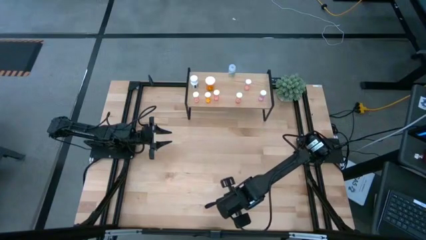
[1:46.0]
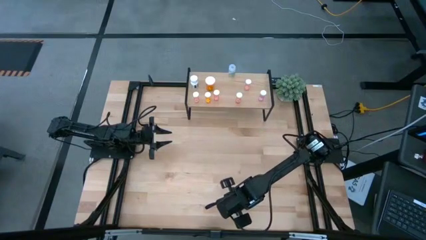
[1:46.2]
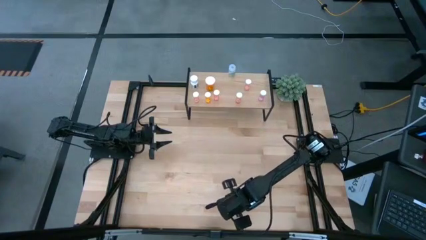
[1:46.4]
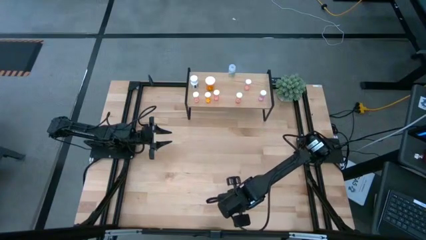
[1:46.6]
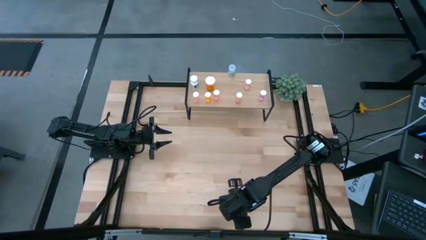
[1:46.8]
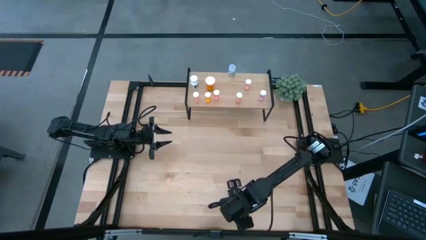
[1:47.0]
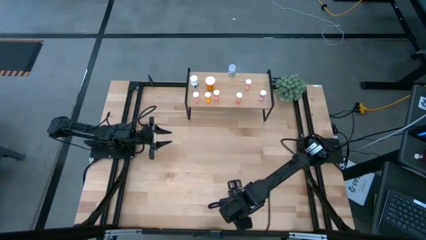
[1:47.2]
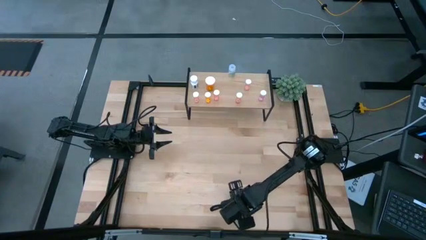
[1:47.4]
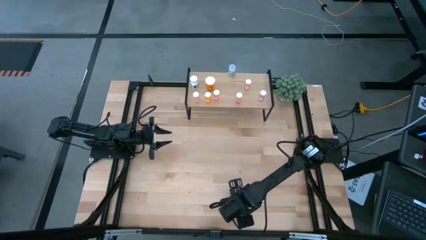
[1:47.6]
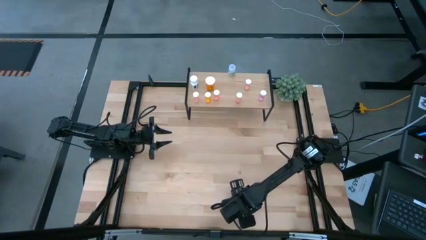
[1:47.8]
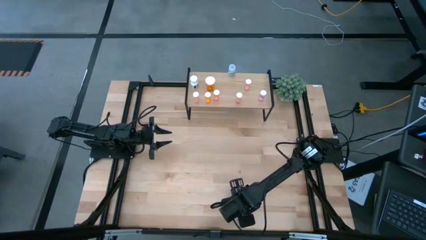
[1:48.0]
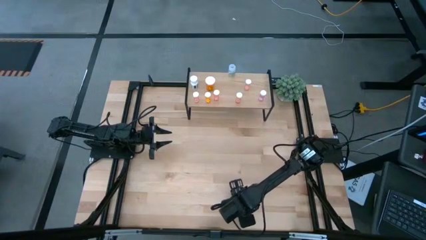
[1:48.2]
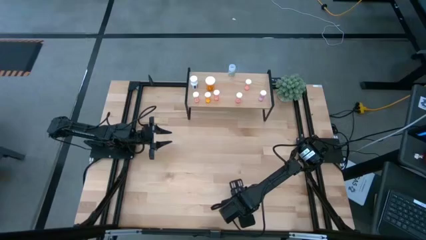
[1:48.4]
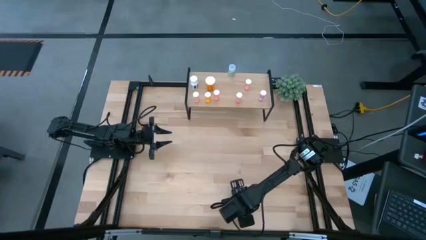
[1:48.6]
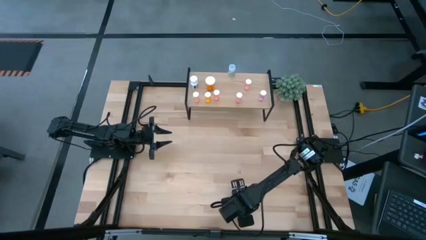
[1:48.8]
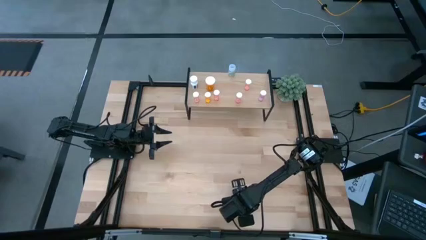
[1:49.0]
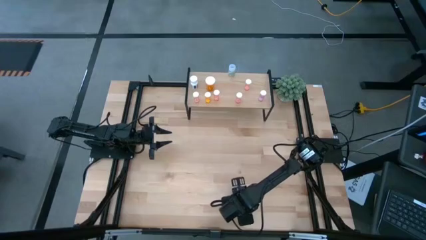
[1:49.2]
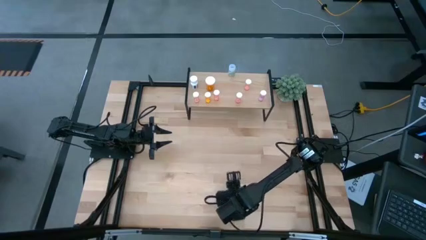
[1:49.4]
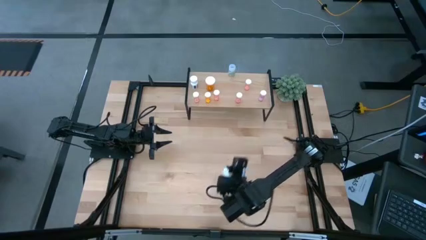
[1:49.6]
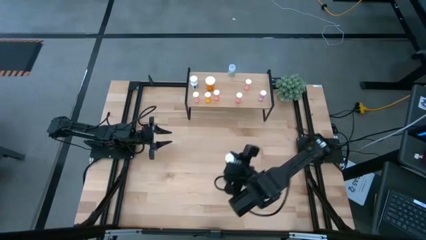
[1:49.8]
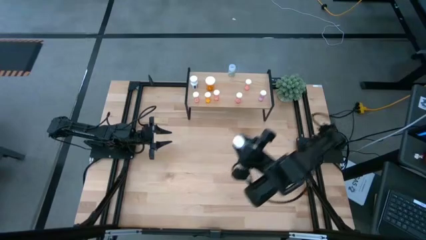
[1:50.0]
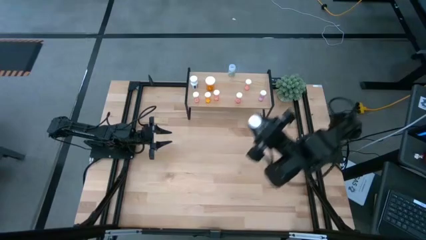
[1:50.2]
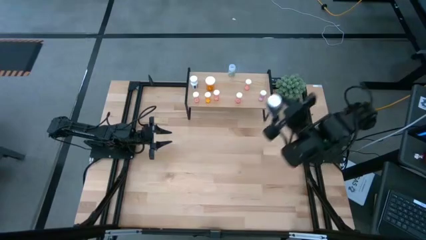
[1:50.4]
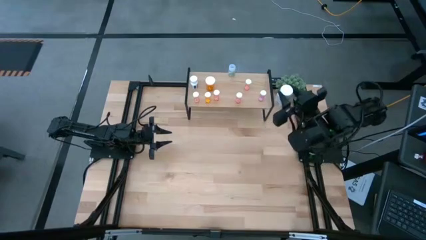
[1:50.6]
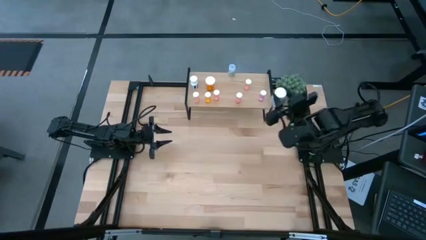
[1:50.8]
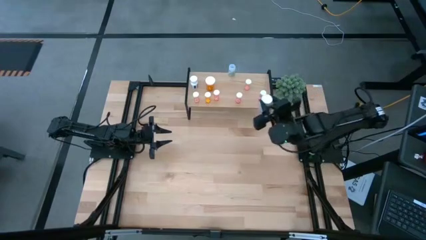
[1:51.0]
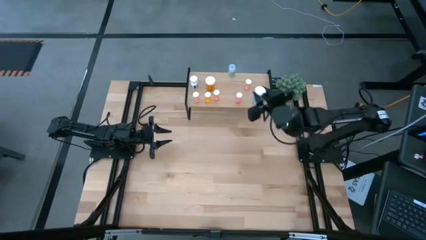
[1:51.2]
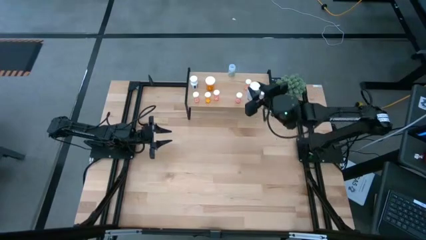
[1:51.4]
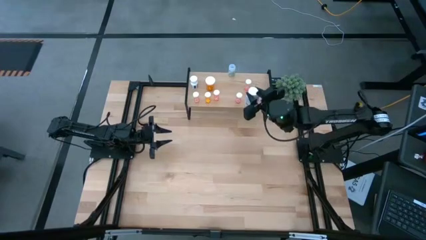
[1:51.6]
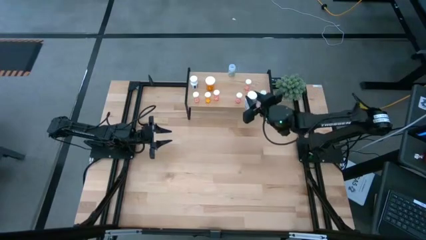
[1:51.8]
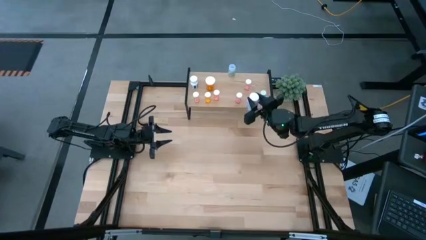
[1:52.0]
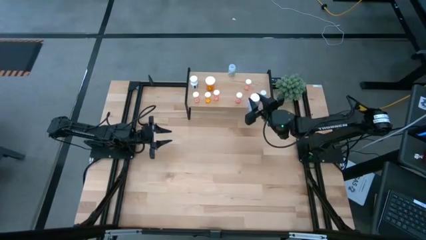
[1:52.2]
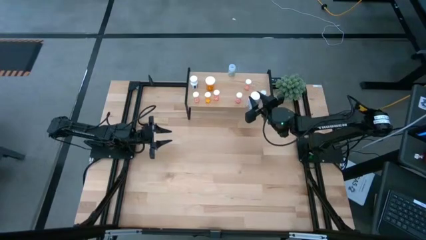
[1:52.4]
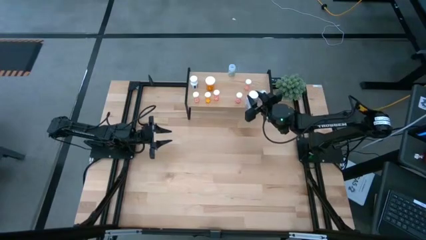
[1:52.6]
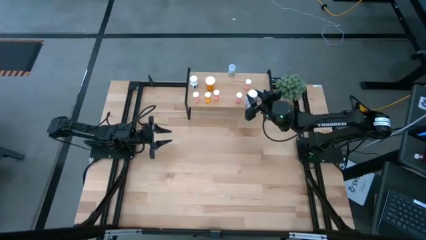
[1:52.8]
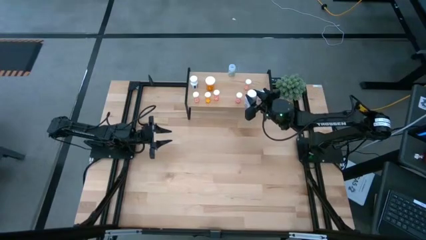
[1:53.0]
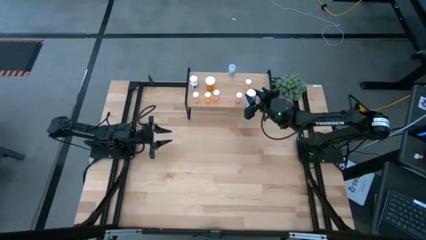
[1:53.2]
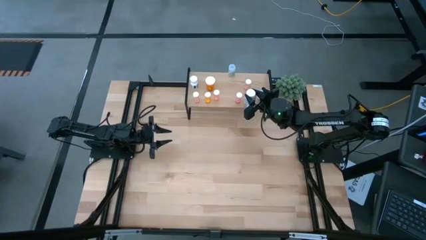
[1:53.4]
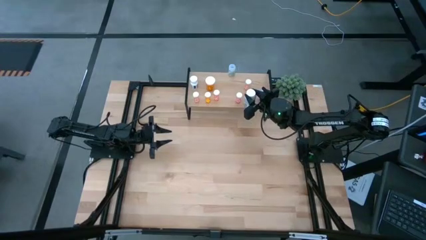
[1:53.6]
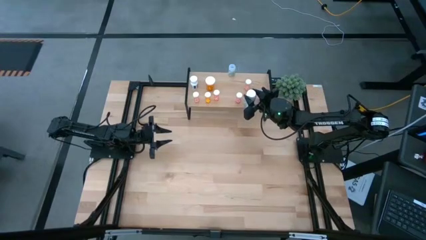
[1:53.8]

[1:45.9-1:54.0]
Task: Pick and place medicine bottles onto shelf by color
Put the big white pill bottle on the shelf

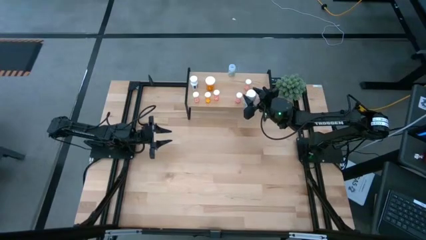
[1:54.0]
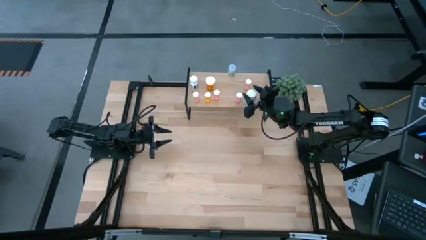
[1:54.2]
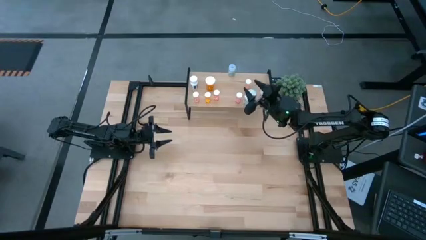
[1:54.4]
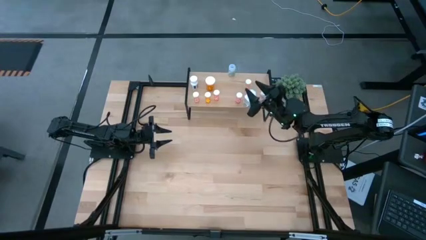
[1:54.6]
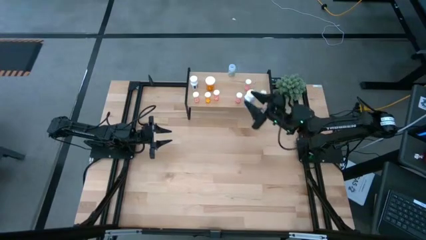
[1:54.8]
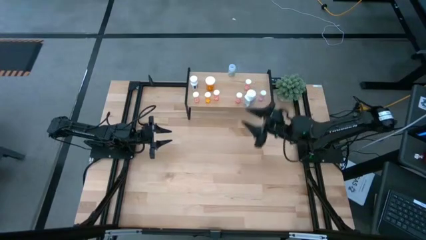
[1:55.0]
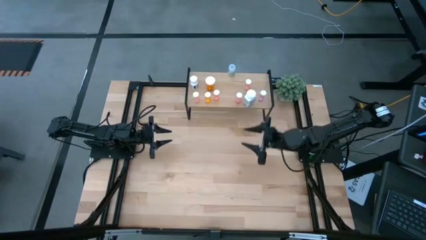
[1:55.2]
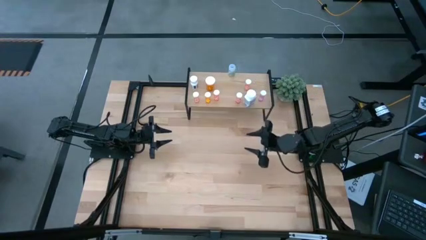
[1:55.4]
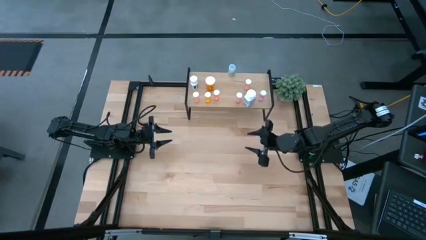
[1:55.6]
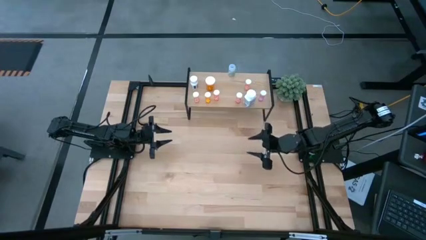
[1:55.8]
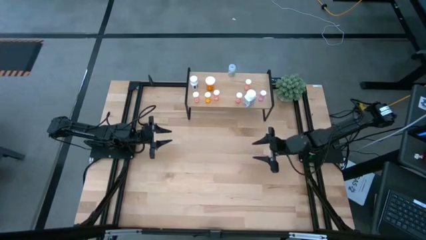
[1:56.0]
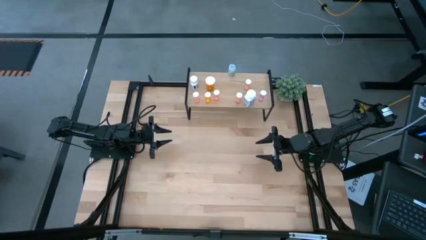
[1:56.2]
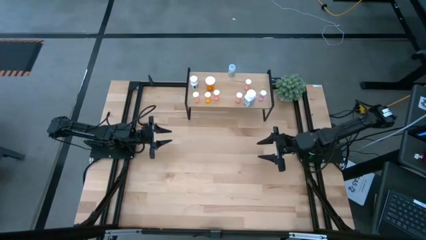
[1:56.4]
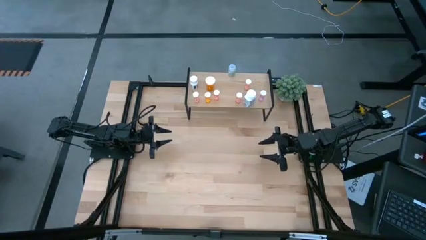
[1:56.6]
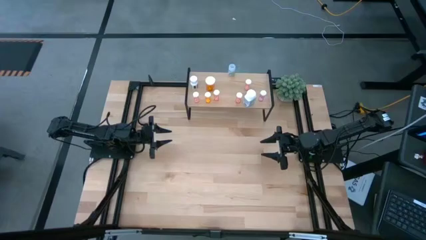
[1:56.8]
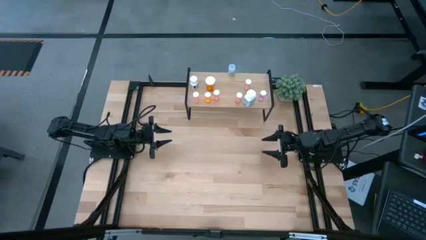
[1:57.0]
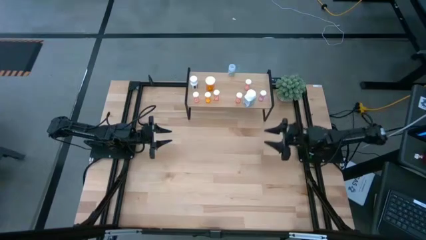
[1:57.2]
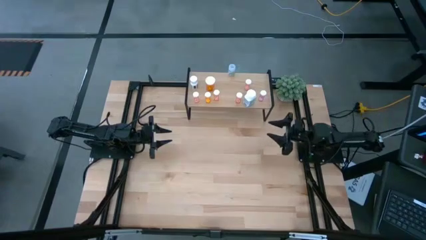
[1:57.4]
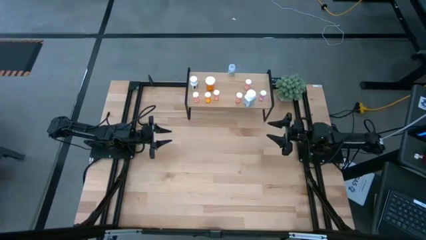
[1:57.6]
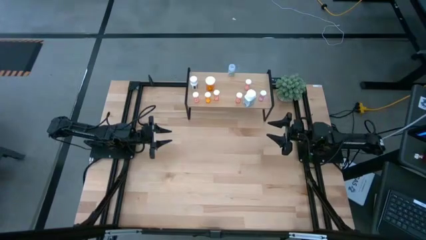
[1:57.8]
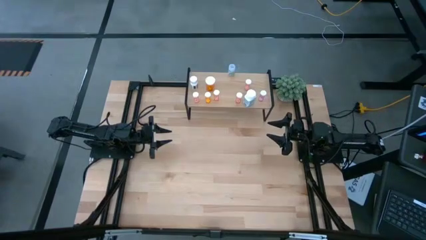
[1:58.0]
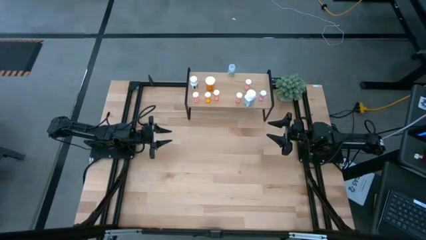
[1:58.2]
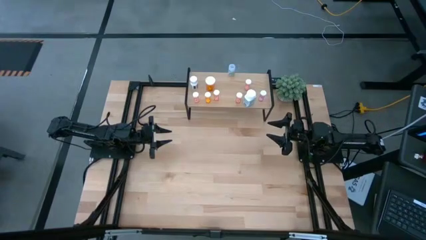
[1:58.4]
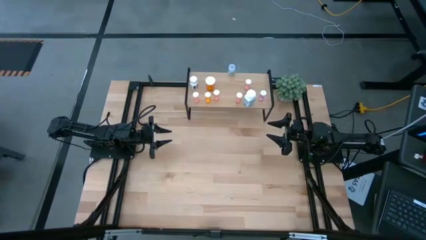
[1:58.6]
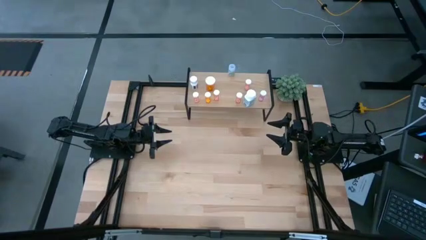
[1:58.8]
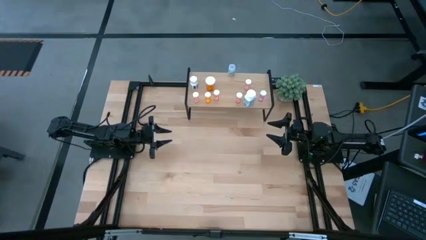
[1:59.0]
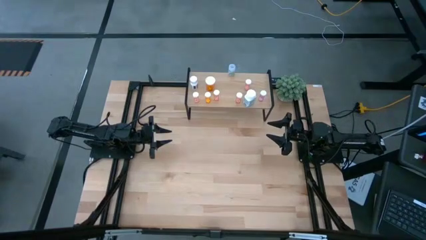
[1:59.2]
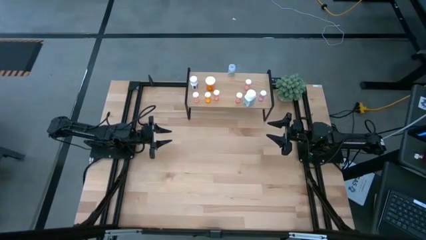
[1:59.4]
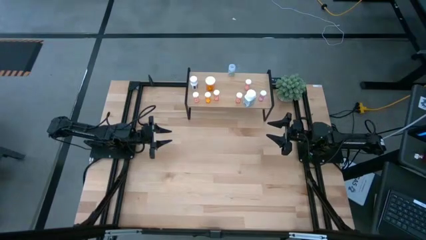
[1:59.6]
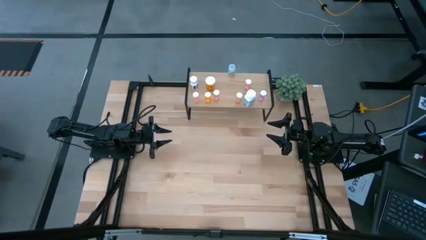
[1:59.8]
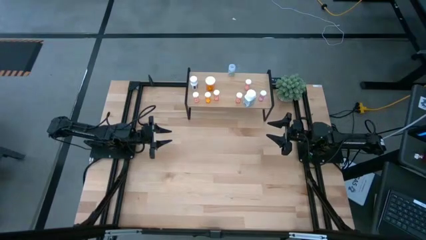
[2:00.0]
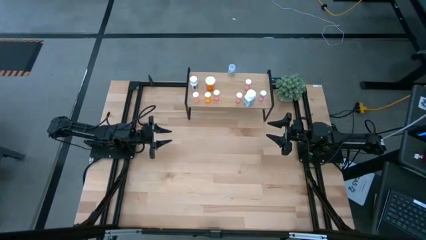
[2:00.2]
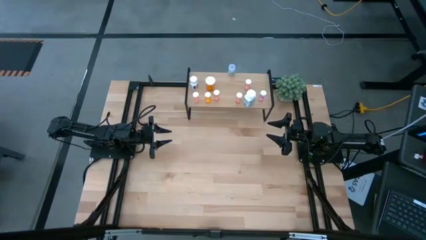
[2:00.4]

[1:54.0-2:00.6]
Return to Home Position
